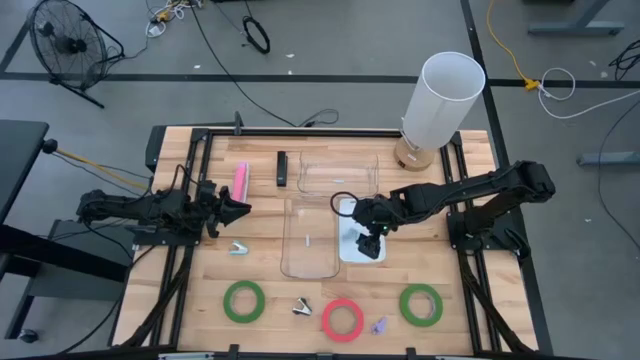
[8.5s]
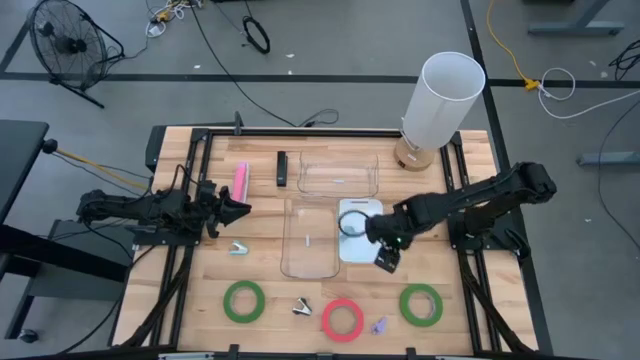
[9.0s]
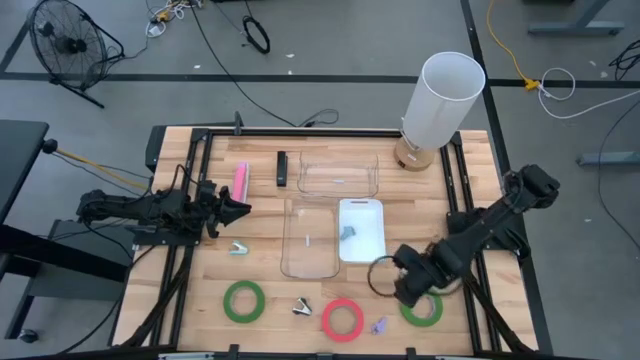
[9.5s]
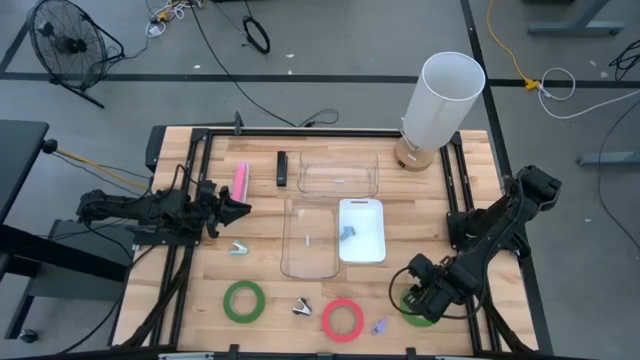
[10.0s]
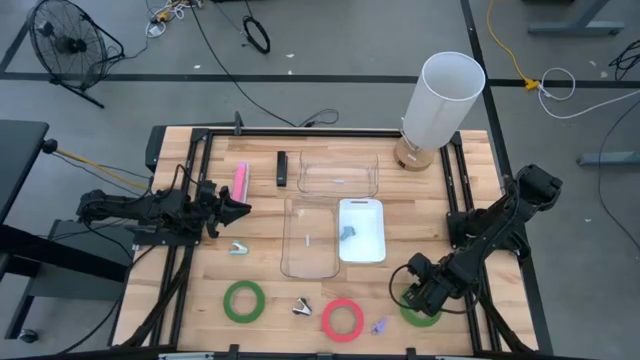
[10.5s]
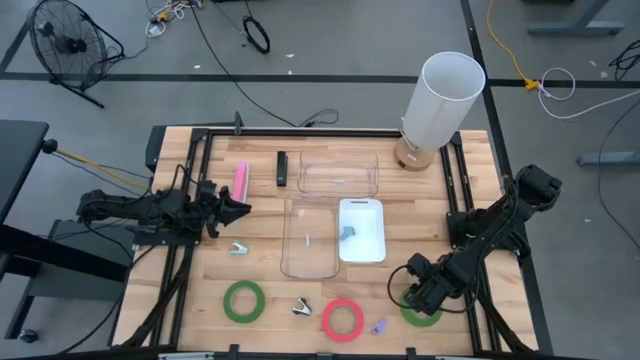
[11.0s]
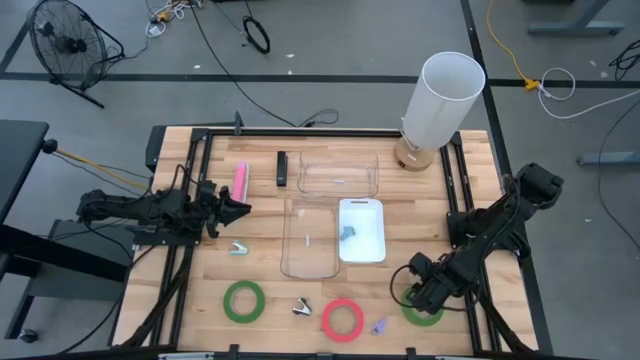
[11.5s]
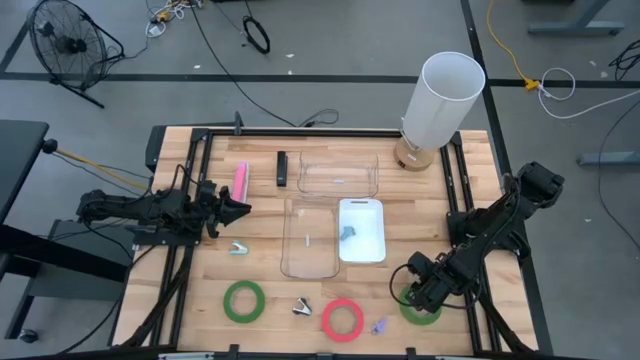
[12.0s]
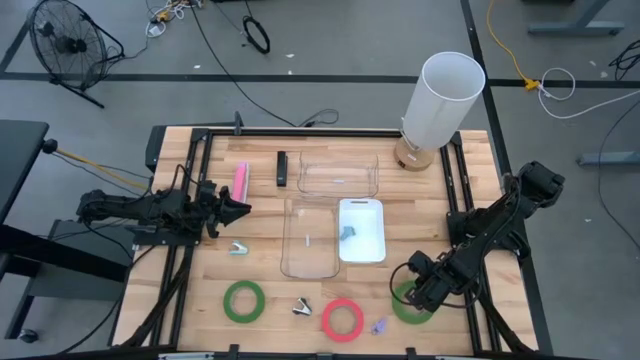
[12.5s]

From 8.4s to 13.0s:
Task: Pick and place Stapler, Stapler remover, tape
Put the right green tape into the top transparent bin

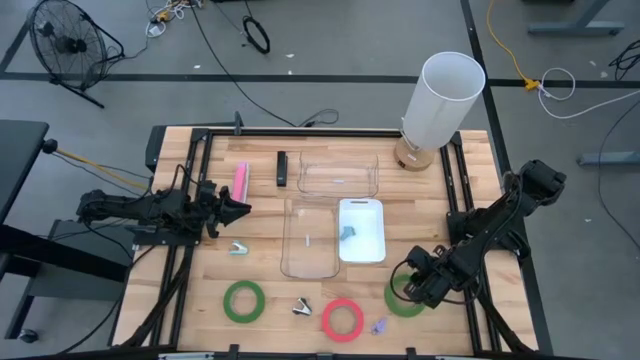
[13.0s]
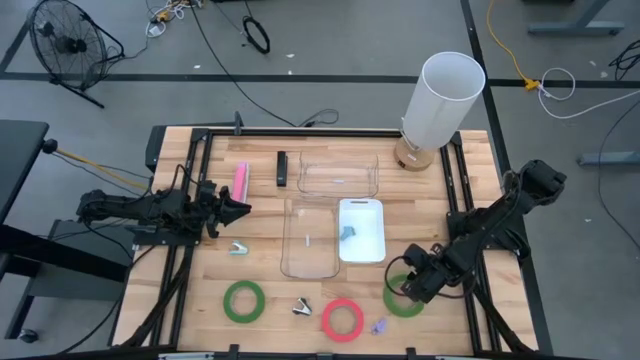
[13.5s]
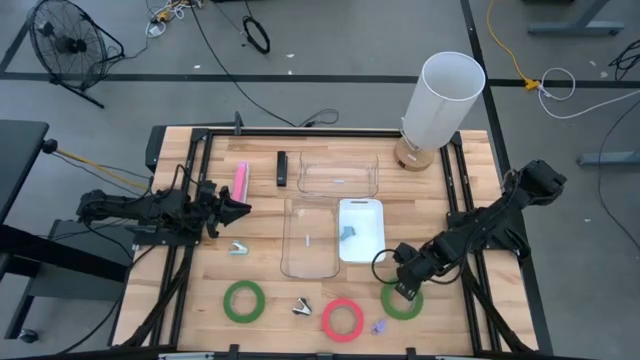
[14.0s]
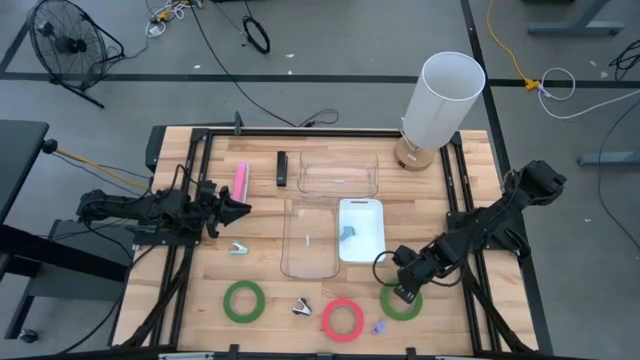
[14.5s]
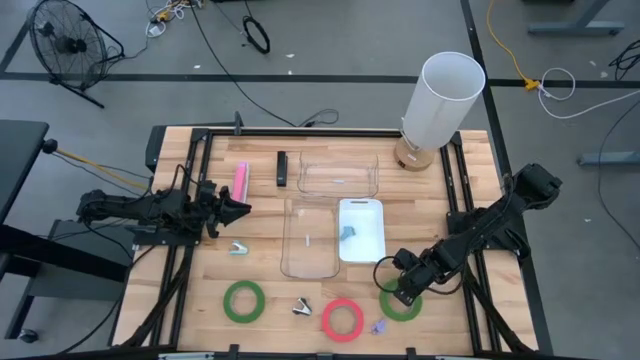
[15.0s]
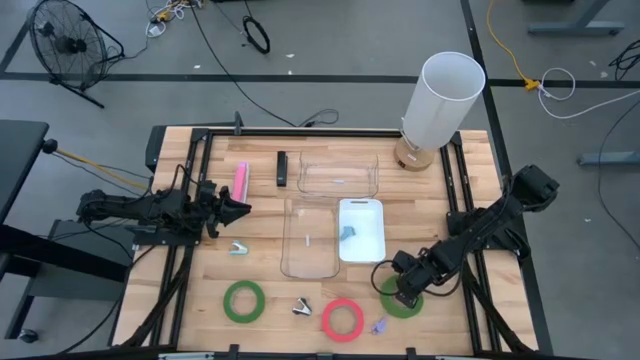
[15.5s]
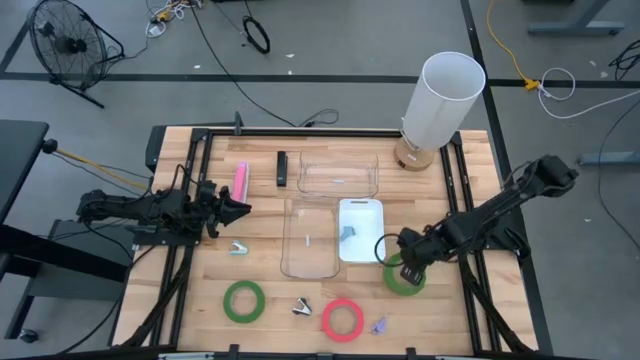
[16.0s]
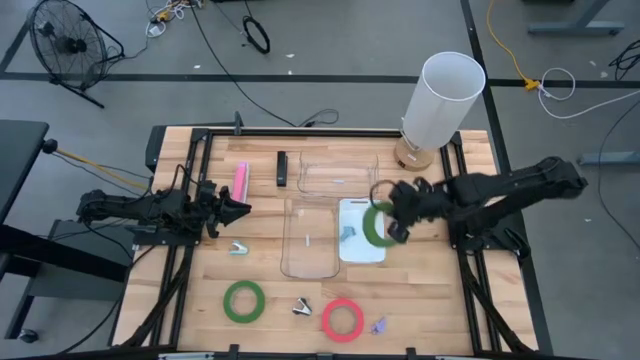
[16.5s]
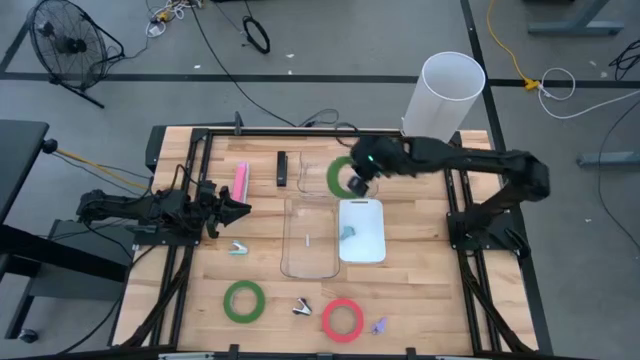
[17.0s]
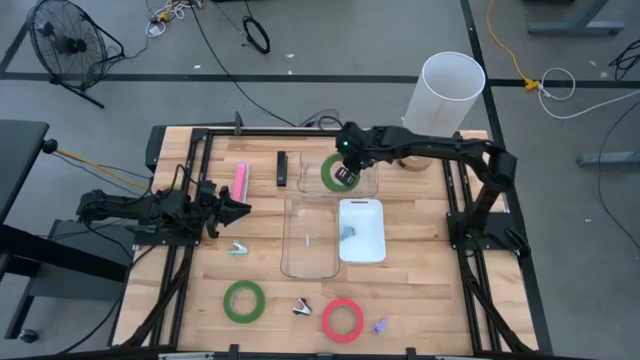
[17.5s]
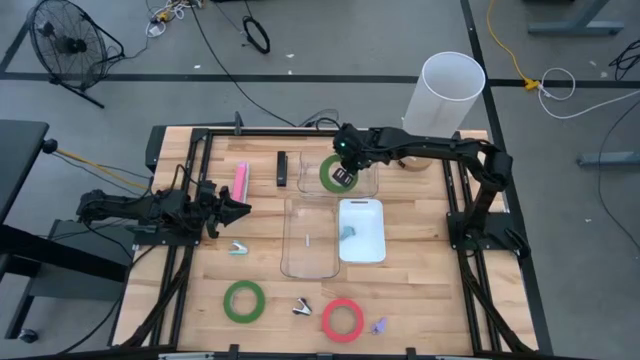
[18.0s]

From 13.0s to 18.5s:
Put the right green tape into the top transparent bin

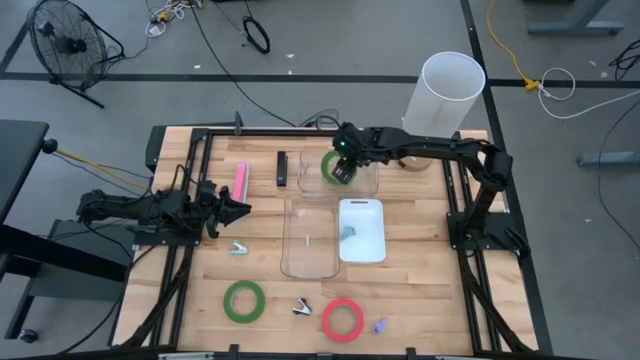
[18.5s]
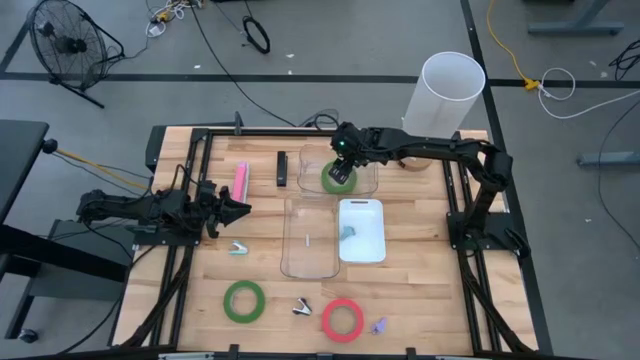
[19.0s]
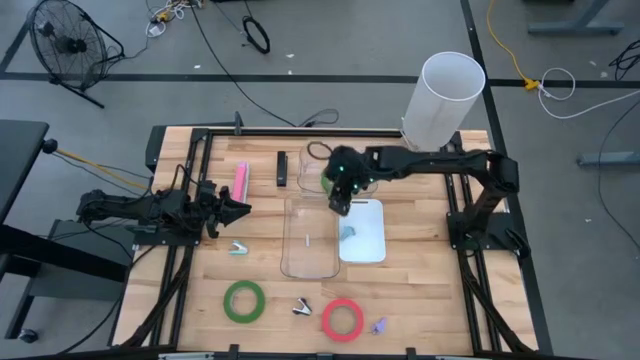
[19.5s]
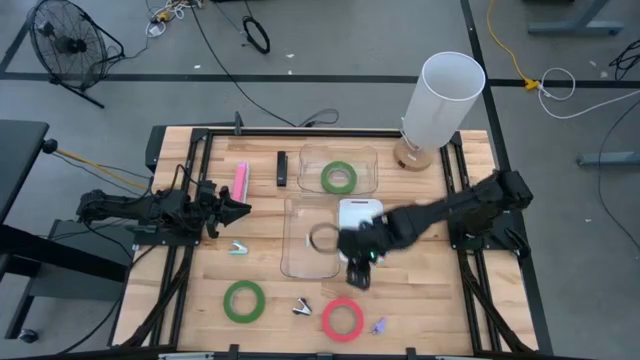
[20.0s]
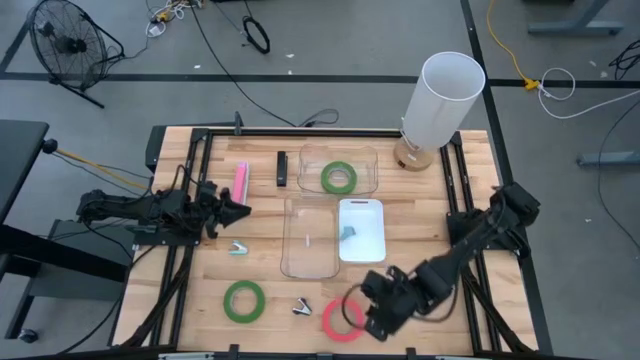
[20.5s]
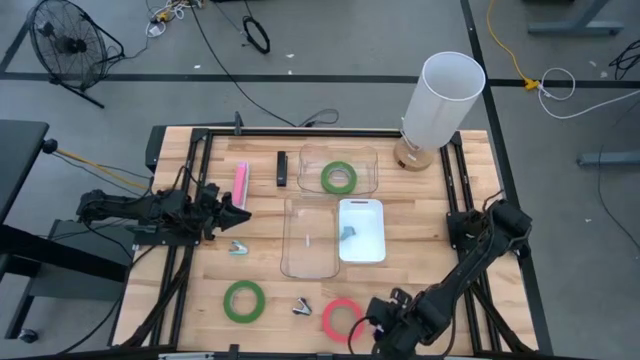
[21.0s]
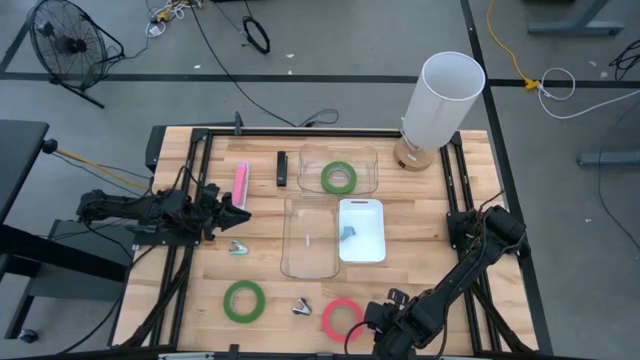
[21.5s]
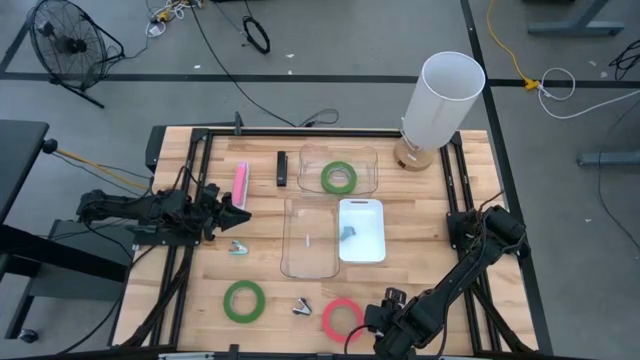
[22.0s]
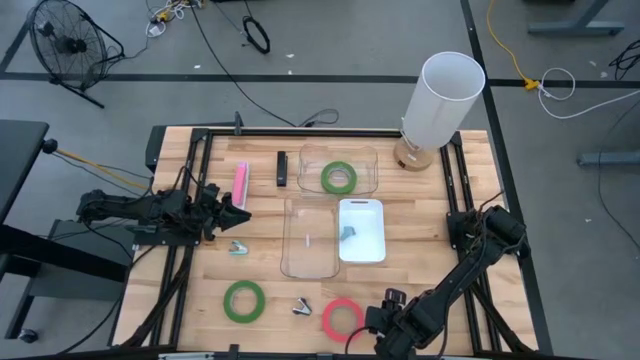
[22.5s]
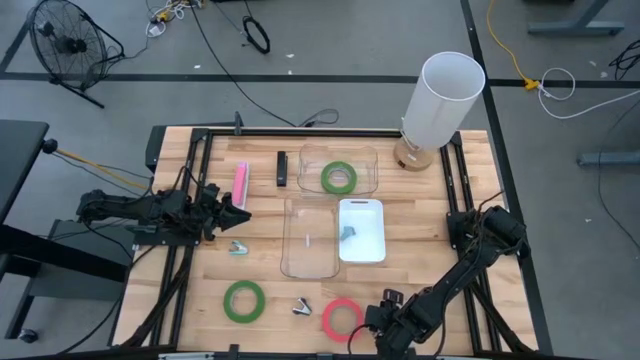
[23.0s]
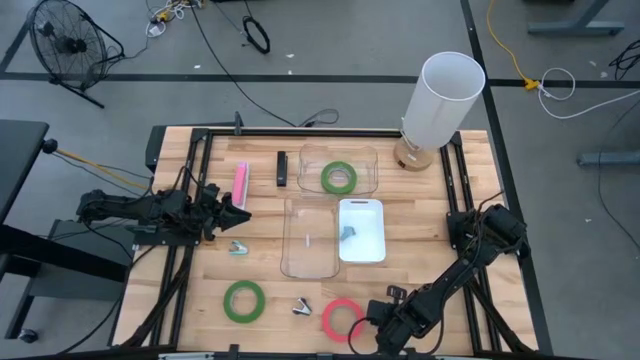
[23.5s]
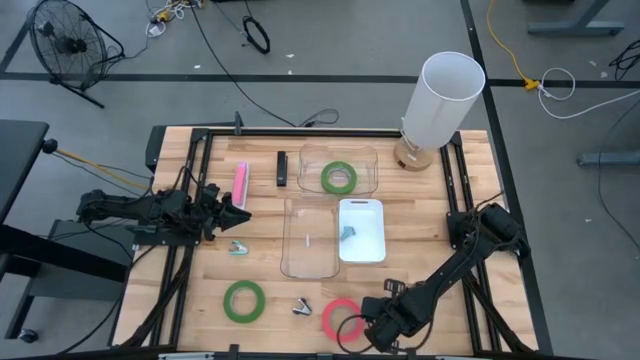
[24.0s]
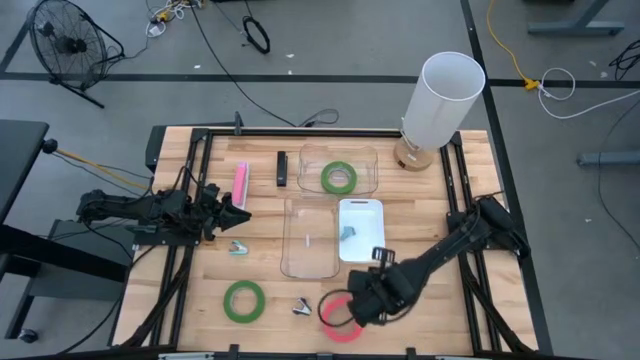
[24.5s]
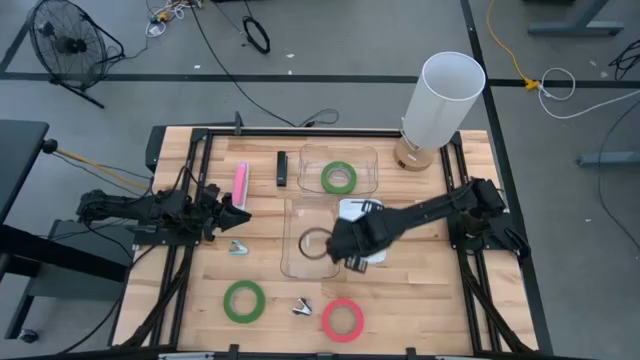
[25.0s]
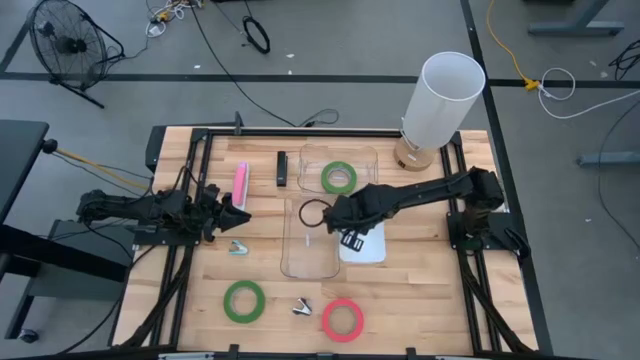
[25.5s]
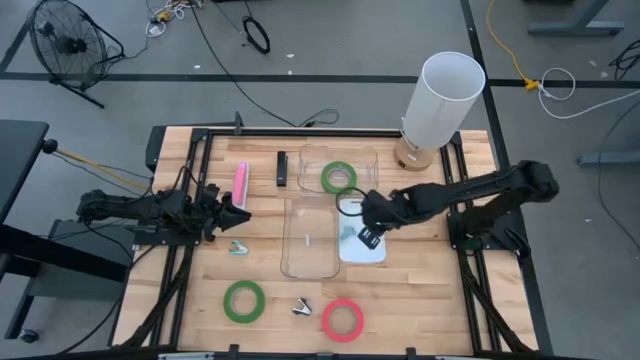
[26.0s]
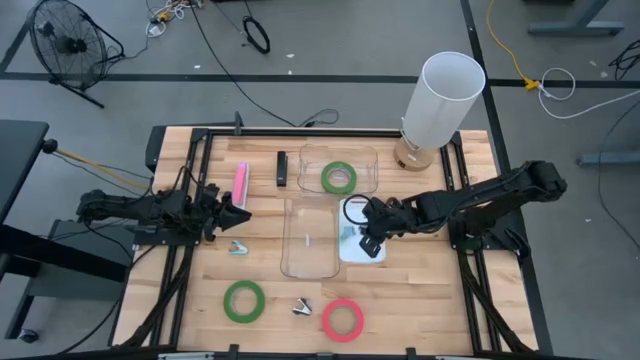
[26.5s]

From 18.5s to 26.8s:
Put the purple staple remover into the white bin

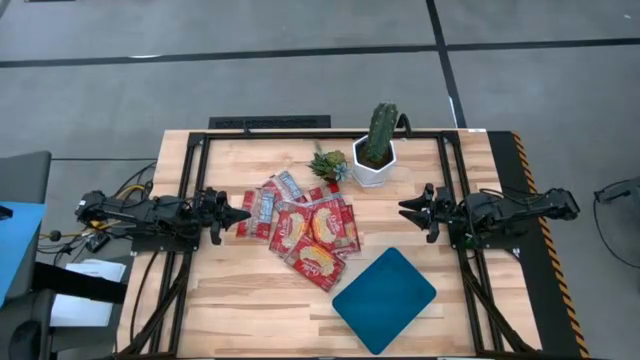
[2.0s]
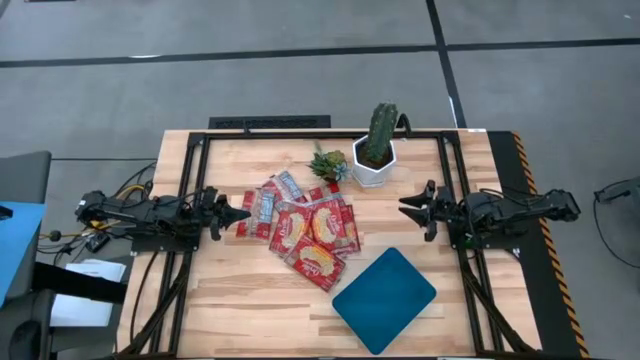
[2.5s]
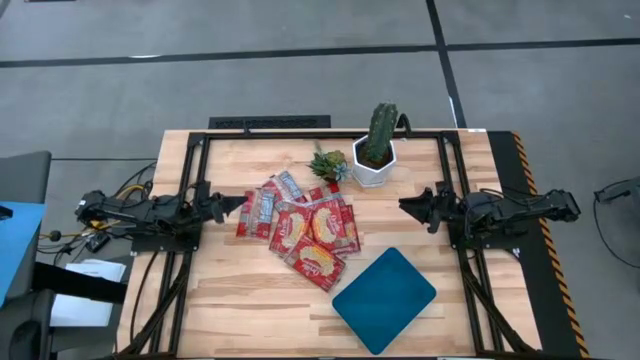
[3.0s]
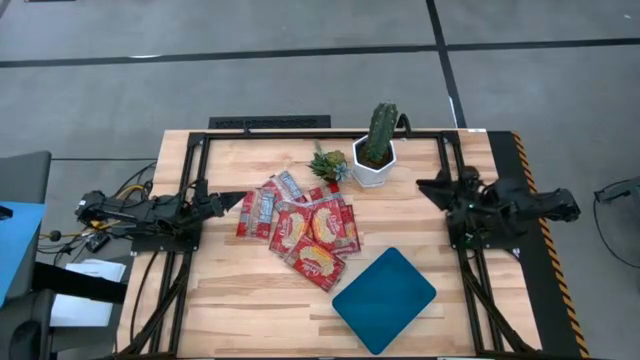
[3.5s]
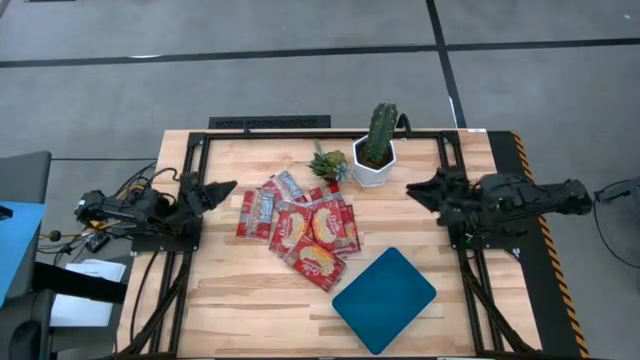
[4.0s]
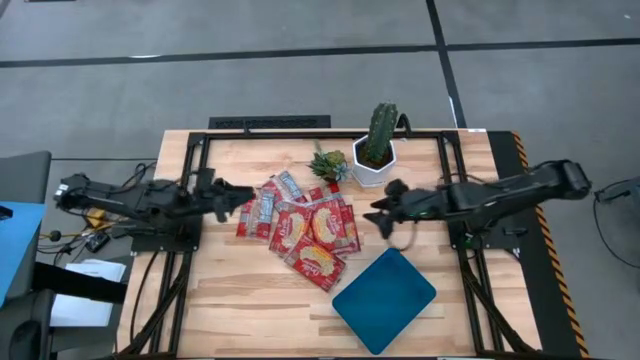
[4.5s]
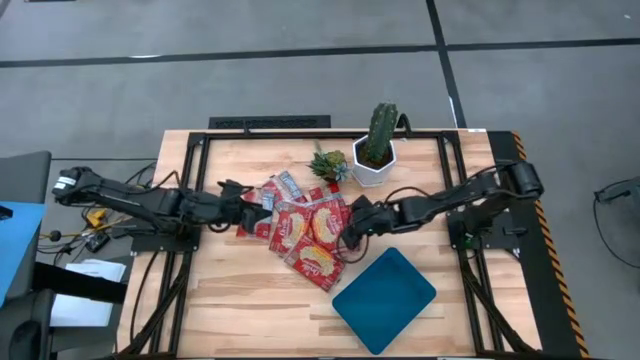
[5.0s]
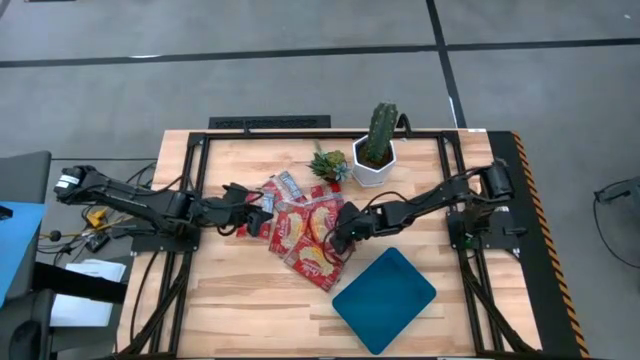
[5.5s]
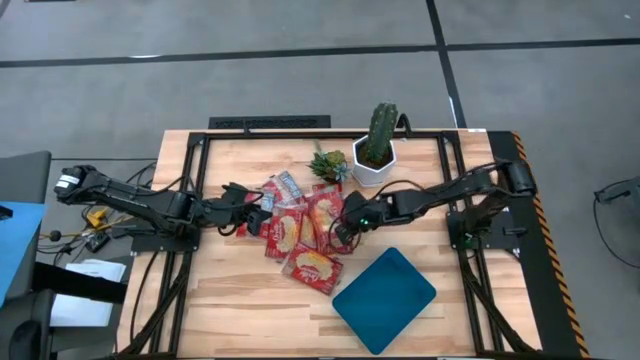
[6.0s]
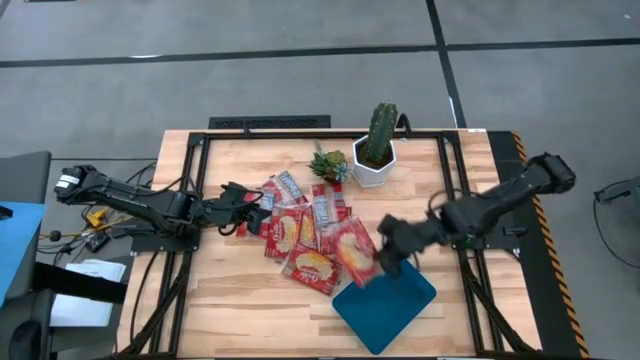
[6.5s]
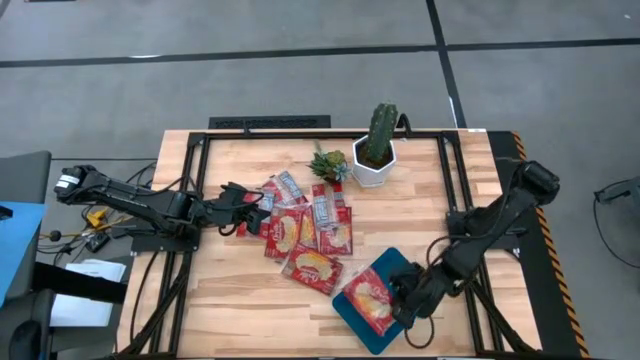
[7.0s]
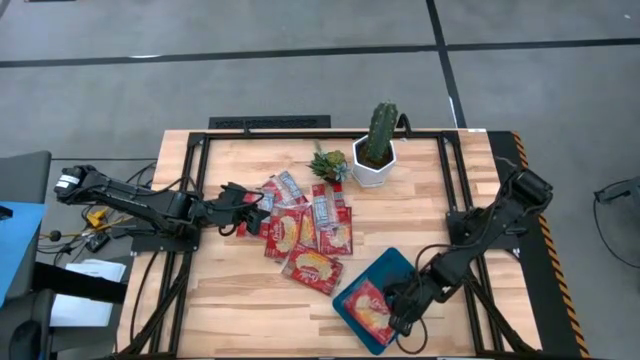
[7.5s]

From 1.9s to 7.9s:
Task: Sort popcorn bags into baskets
Put the popcorn bag into the bin
